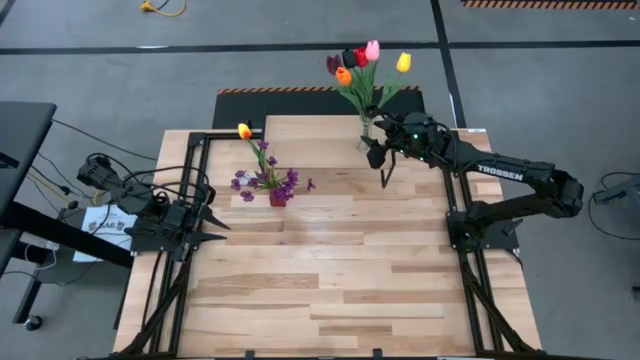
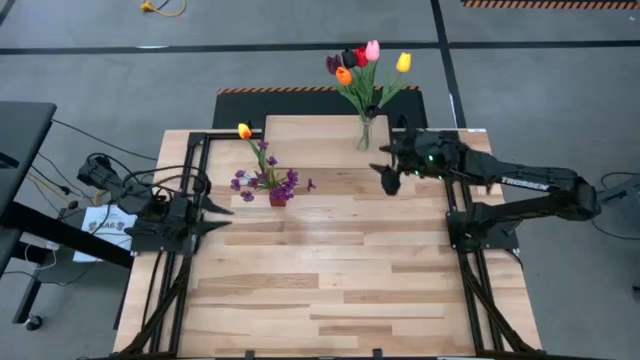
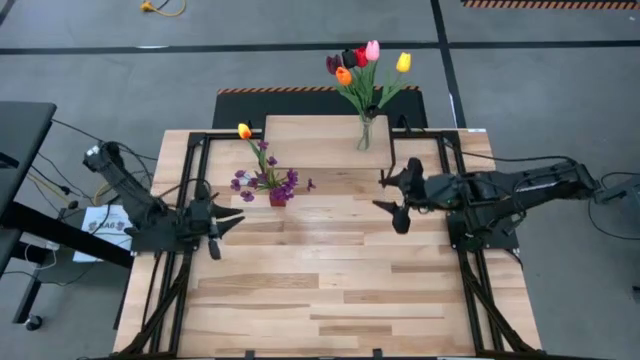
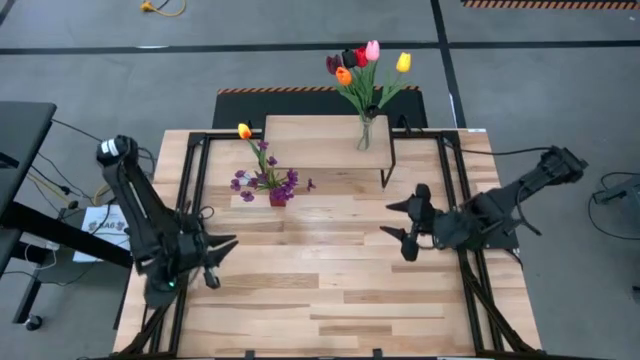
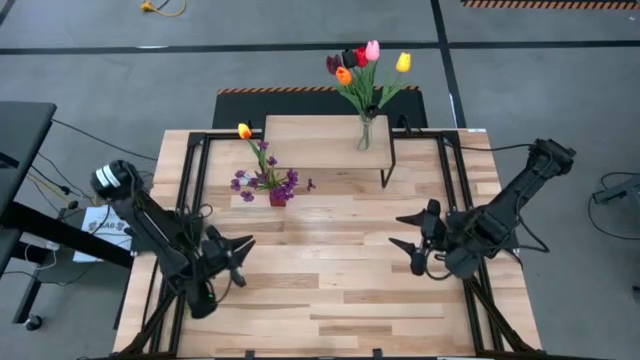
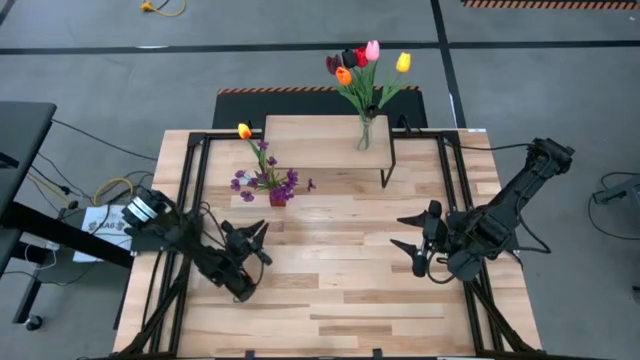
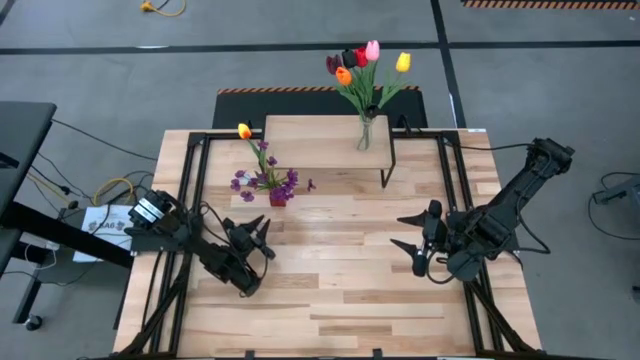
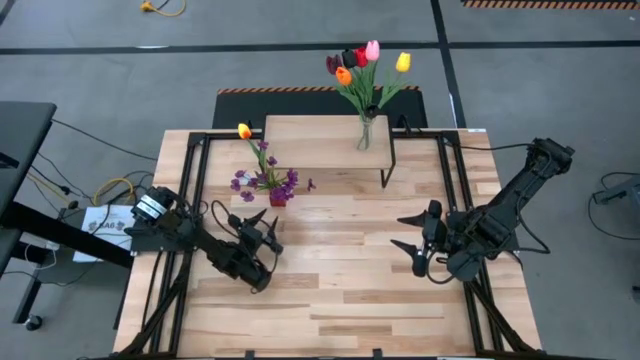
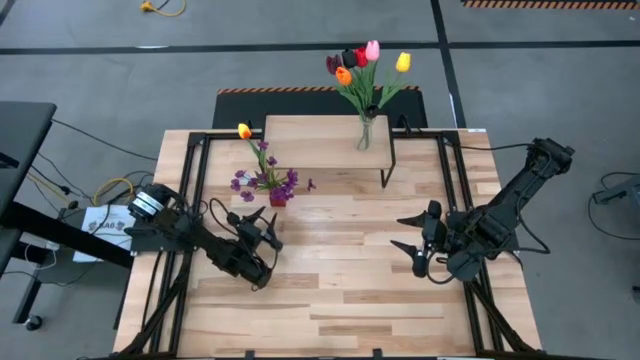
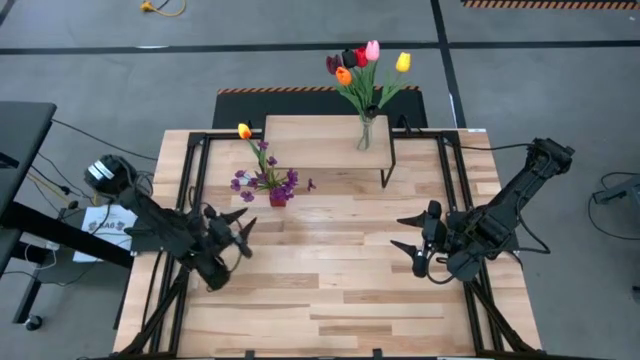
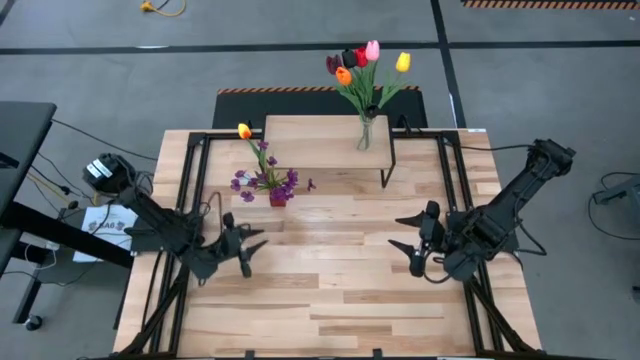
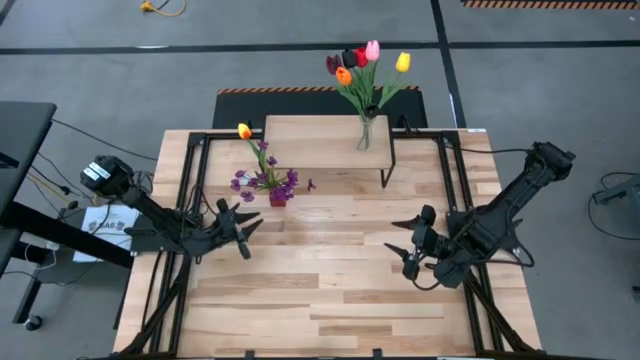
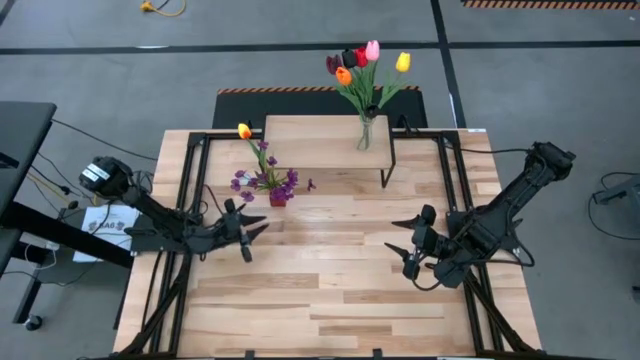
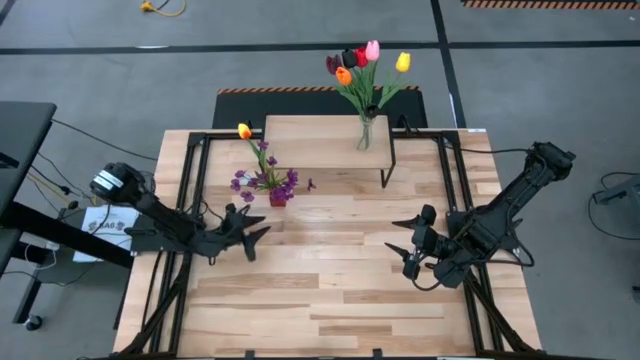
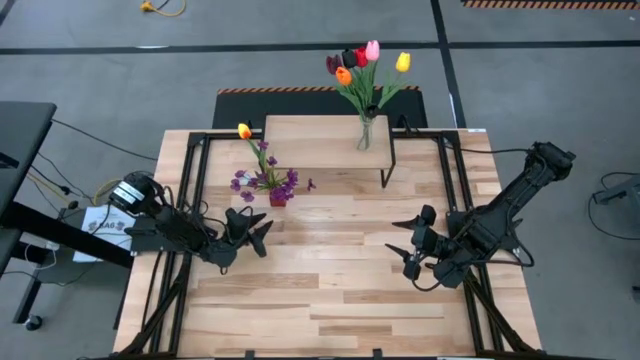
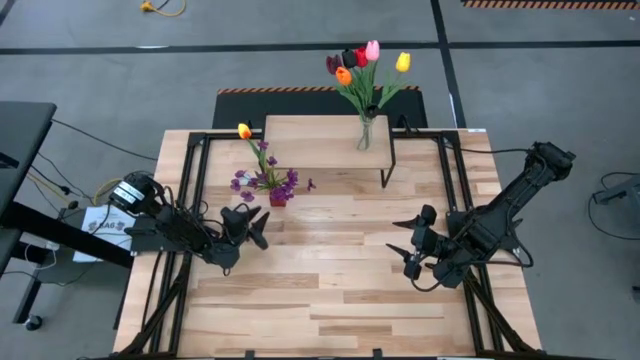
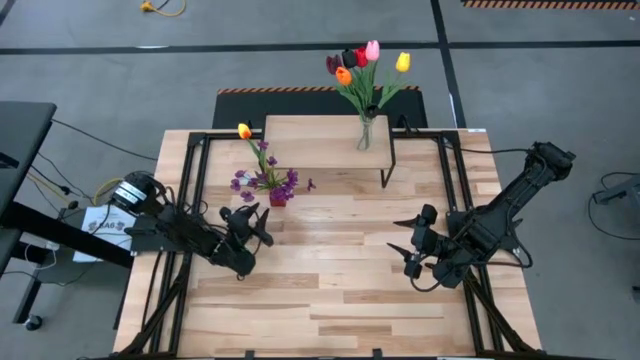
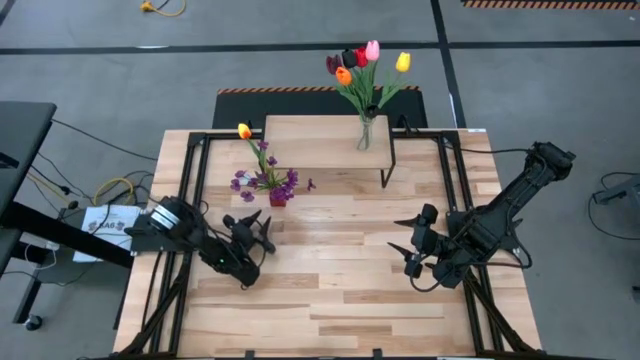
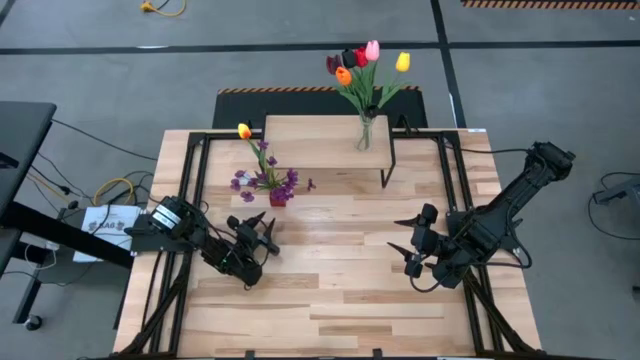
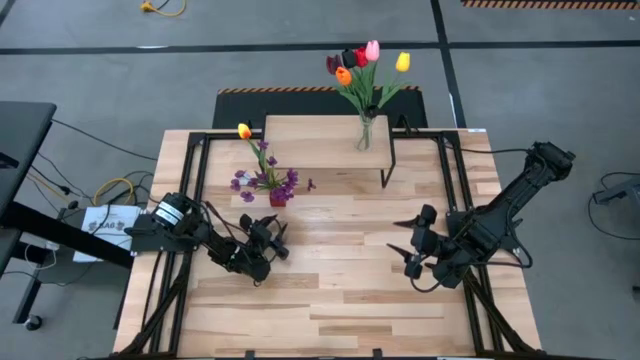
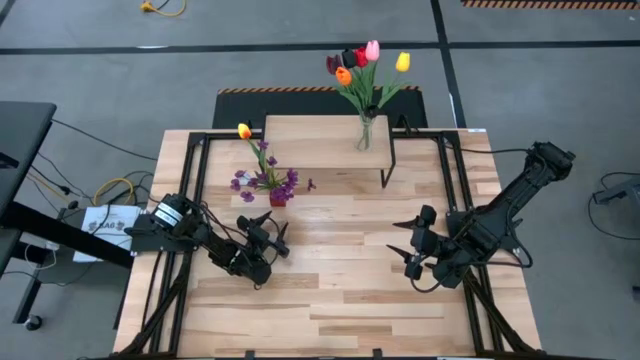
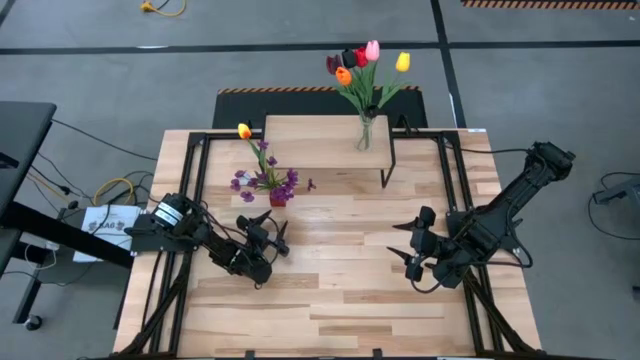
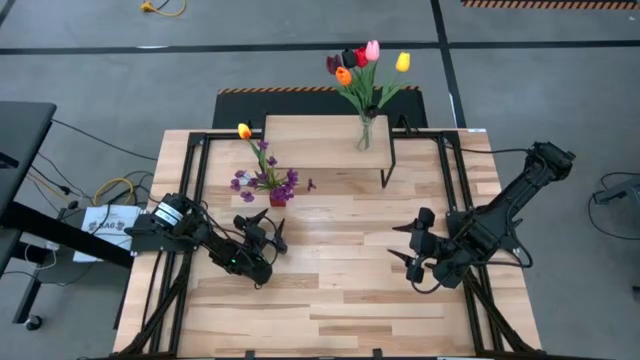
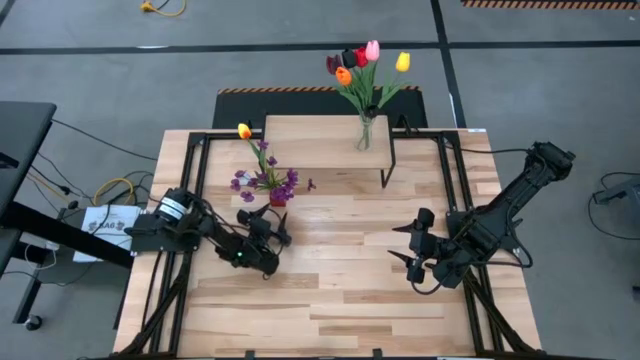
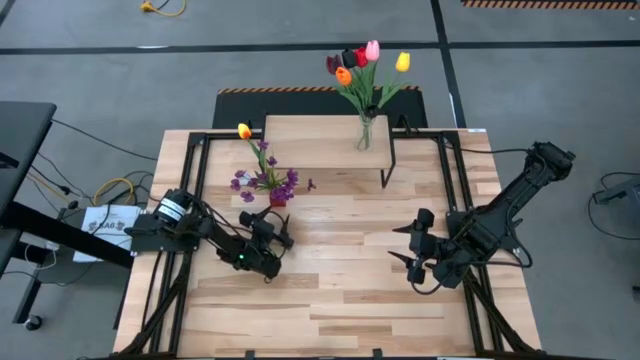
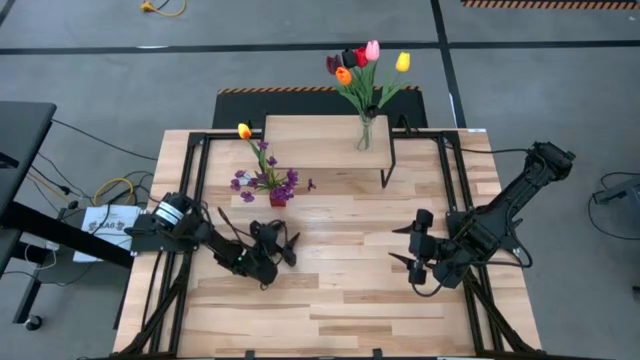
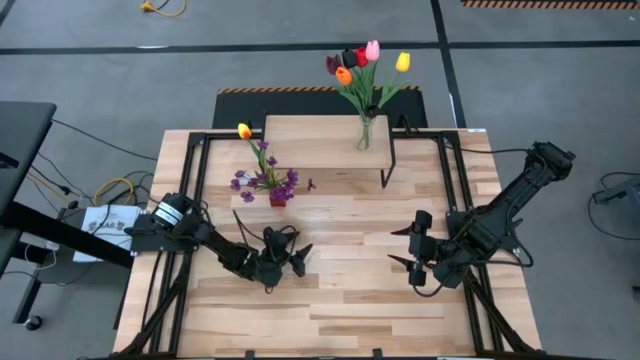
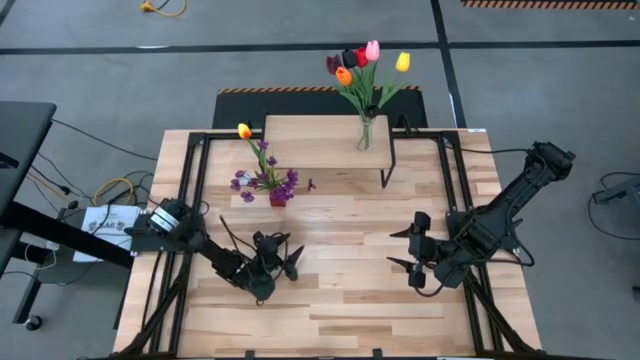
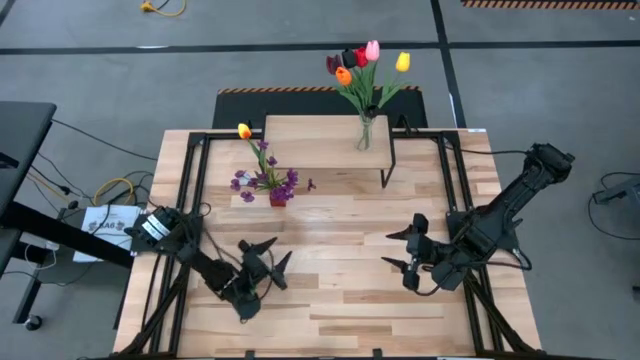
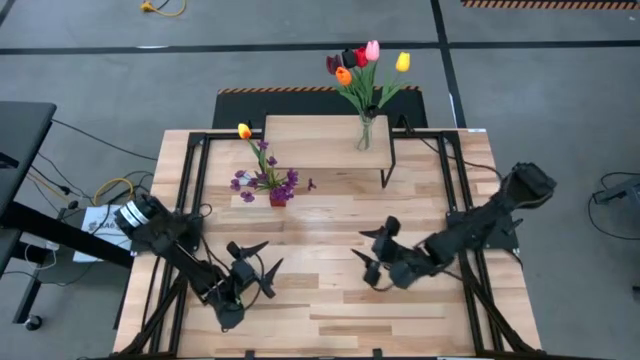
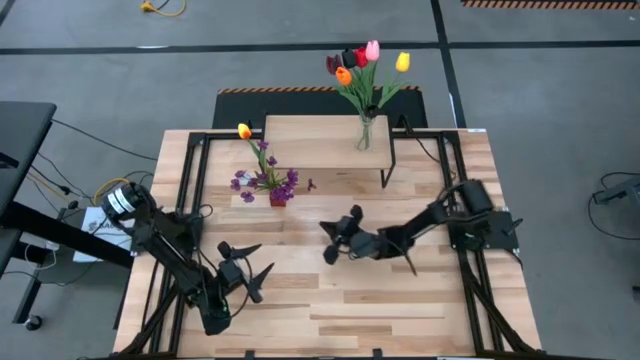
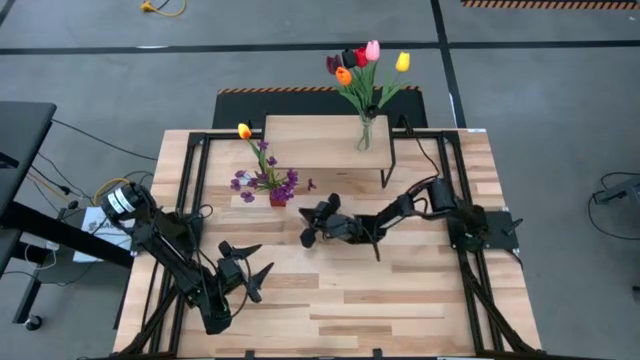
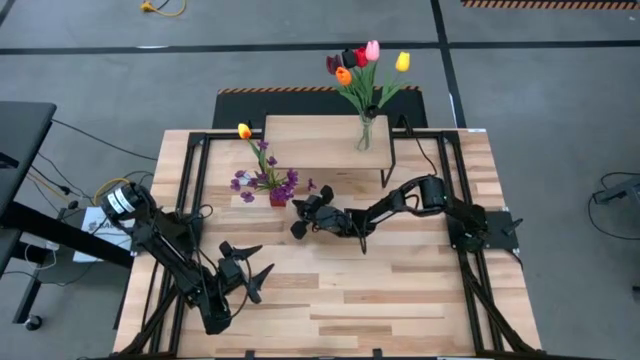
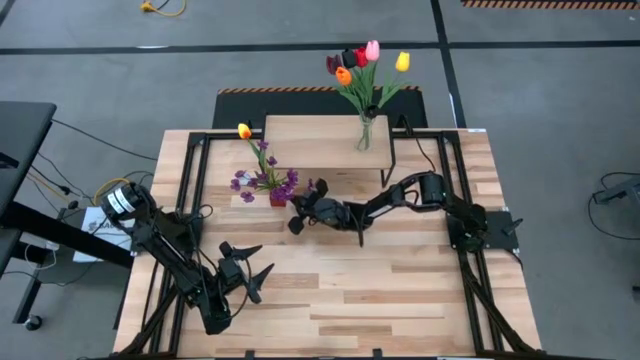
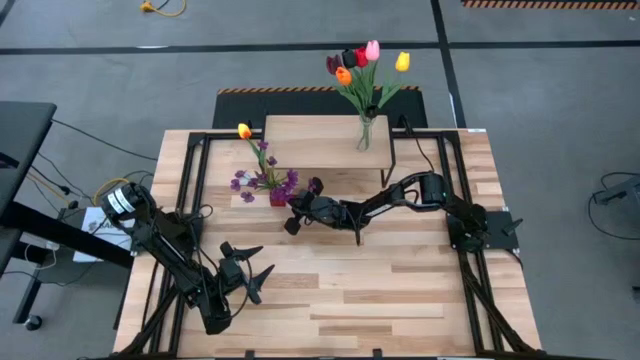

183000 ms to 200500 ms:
Task: Pick and place flowers into a vace then onto a shelf
Put the red vase filled with flowers on the shelf

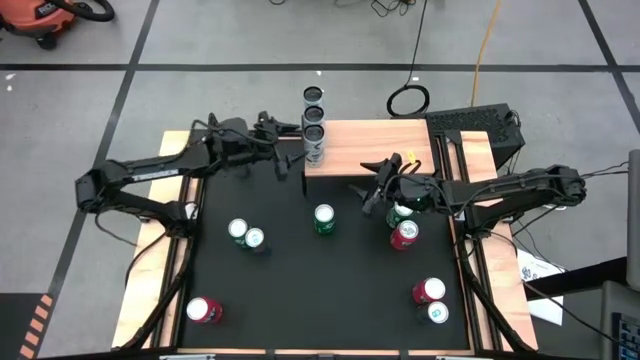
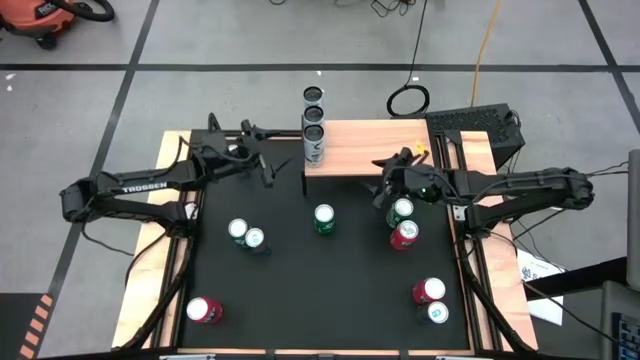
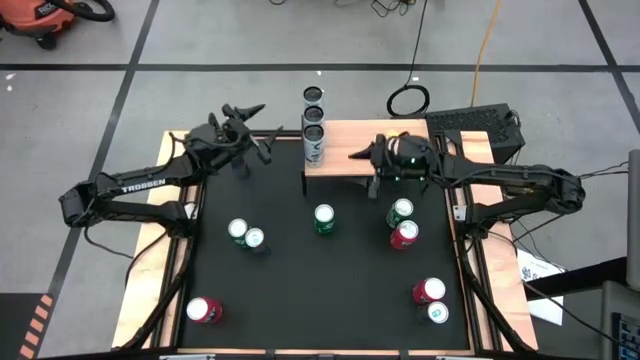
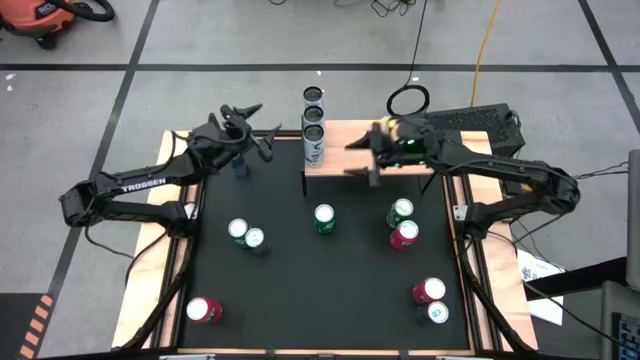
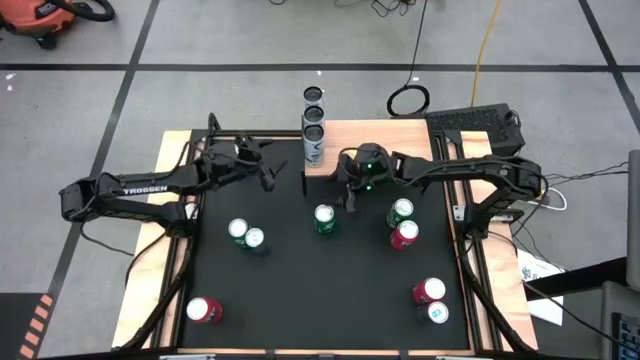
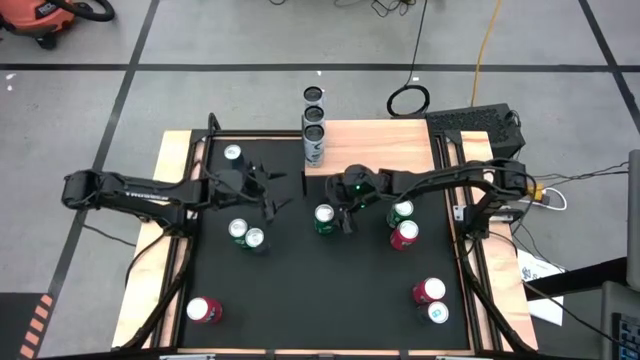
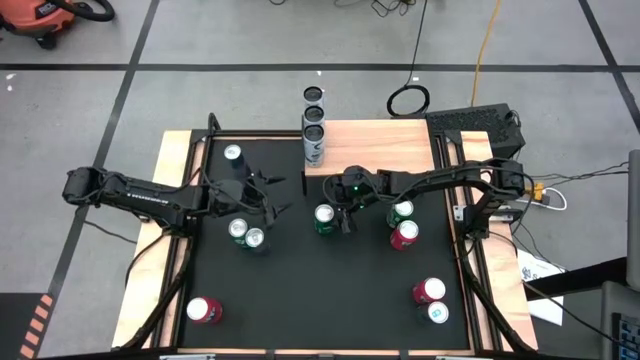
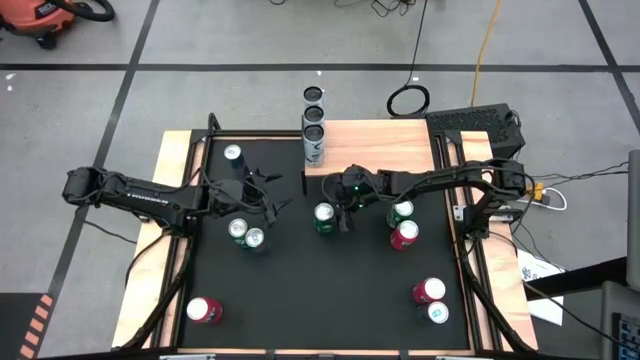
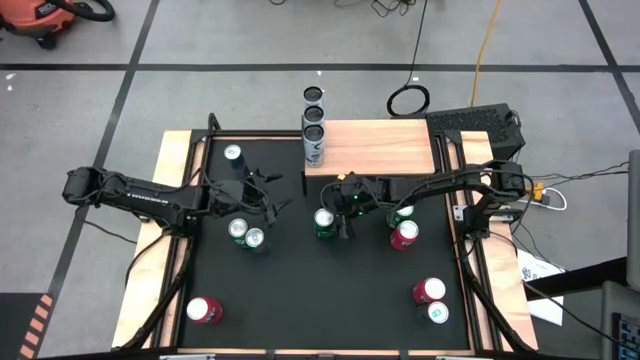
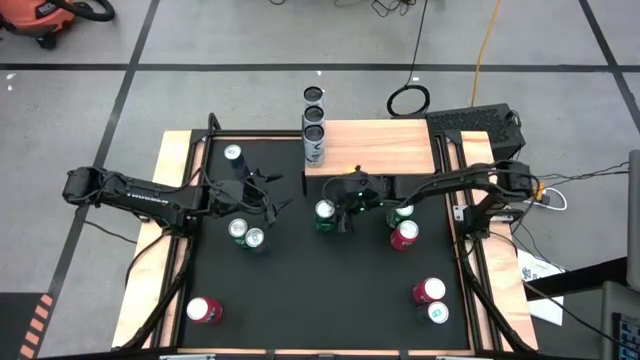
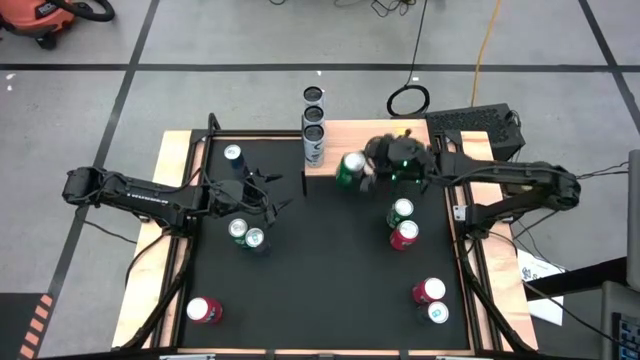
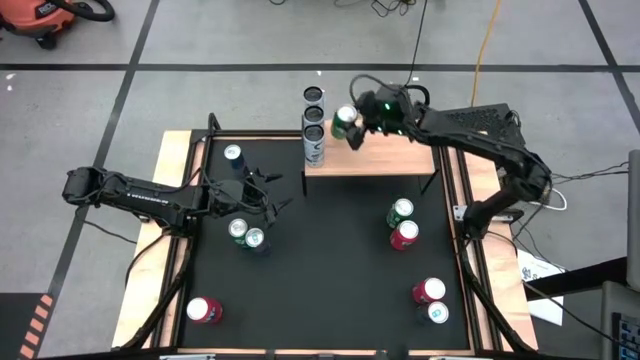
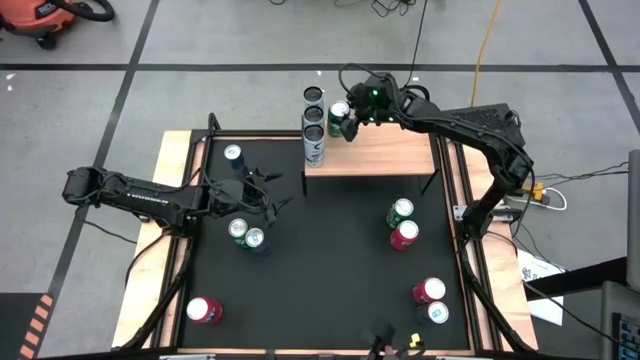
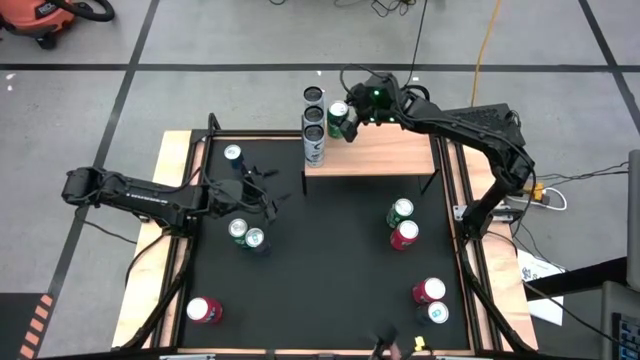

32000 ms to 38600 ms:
Task: Place canned beverage on shelf
Put the middle green soda can on the shelf
